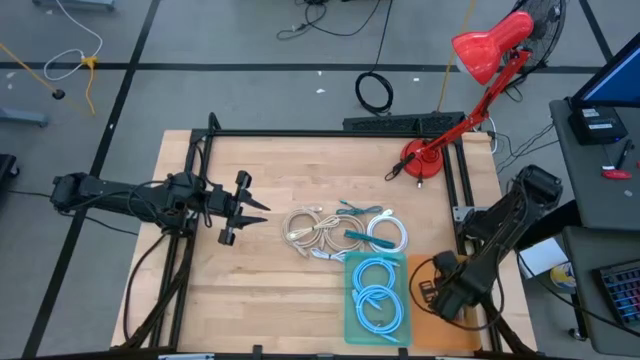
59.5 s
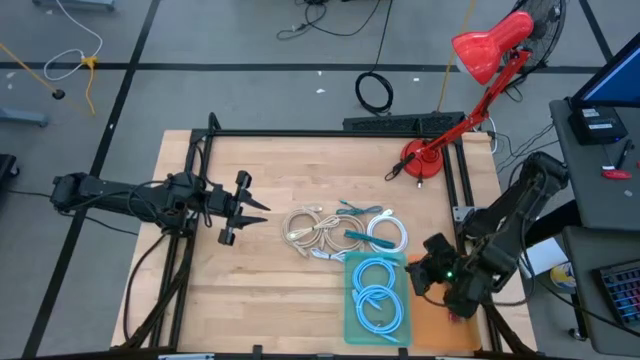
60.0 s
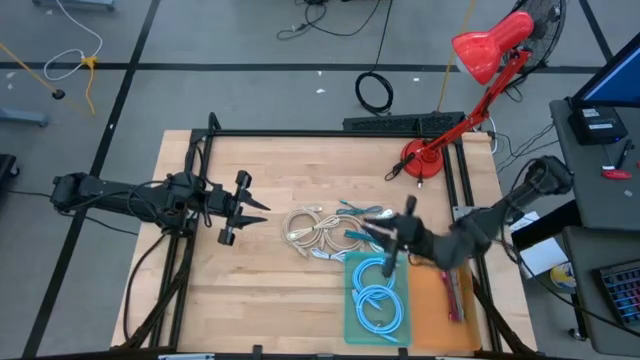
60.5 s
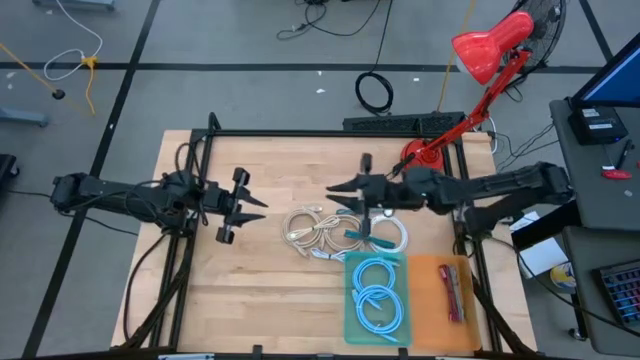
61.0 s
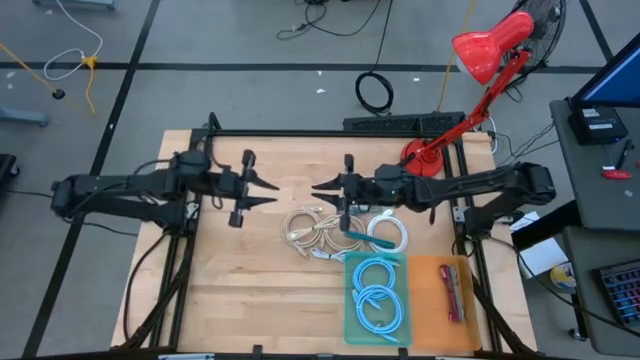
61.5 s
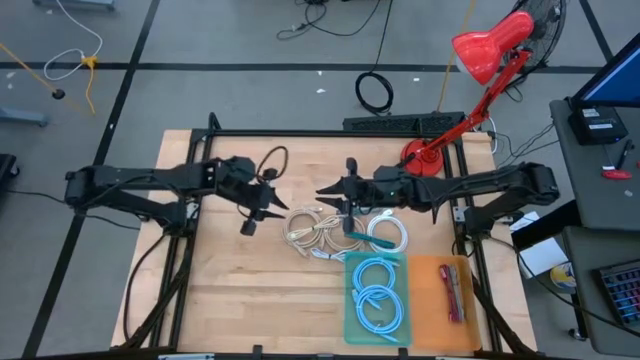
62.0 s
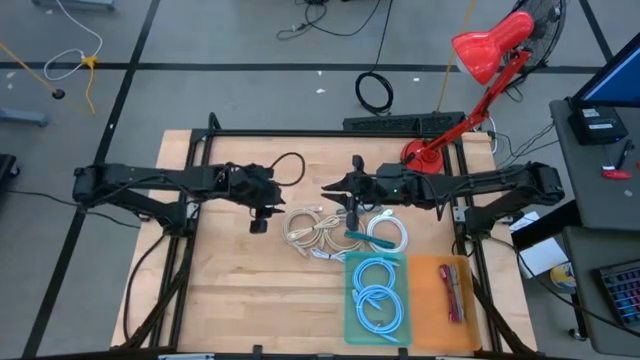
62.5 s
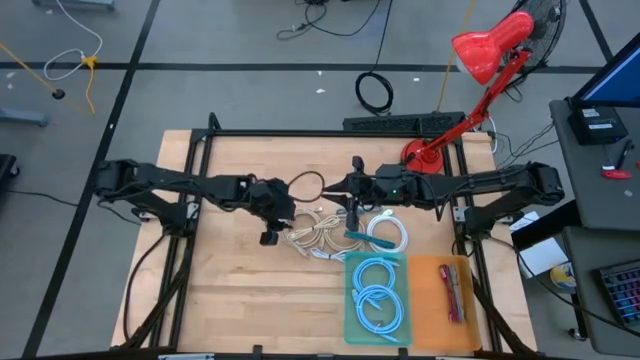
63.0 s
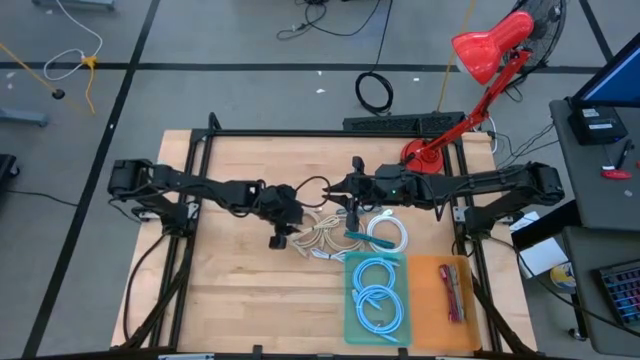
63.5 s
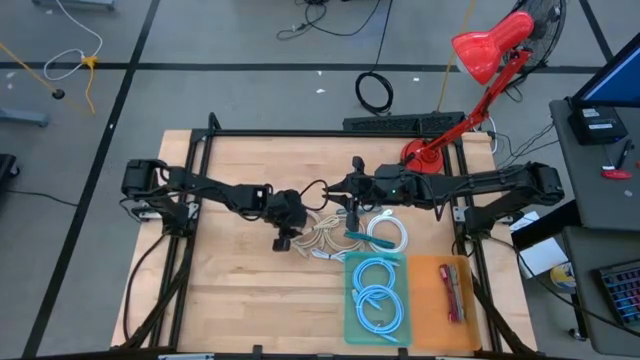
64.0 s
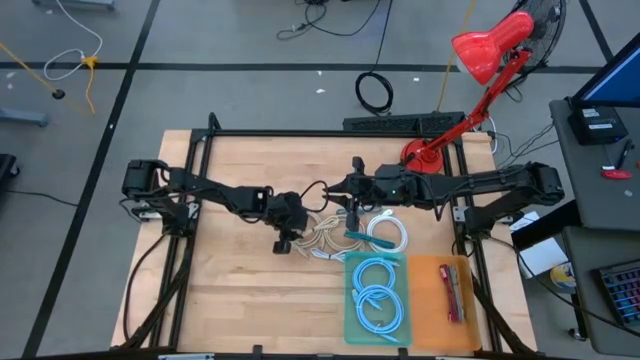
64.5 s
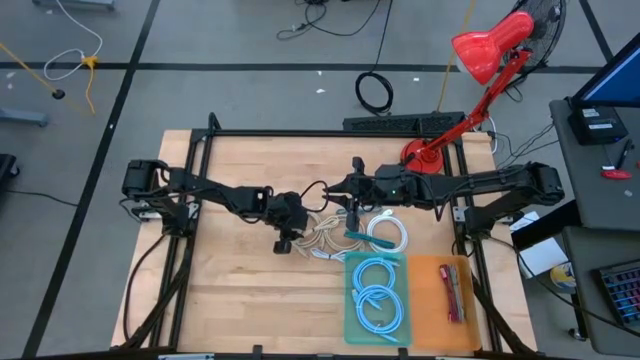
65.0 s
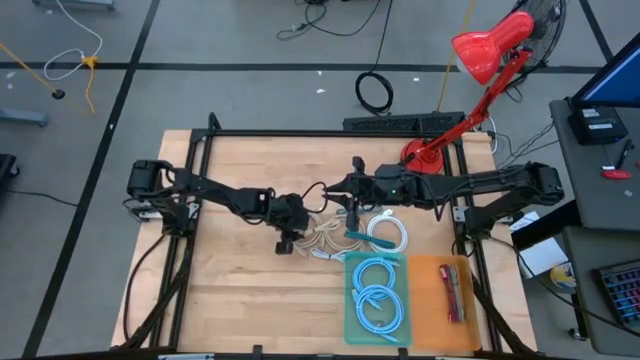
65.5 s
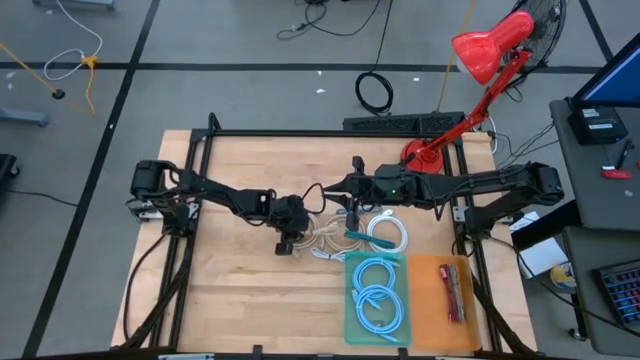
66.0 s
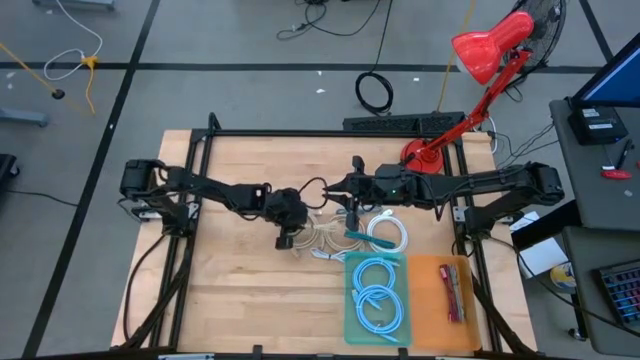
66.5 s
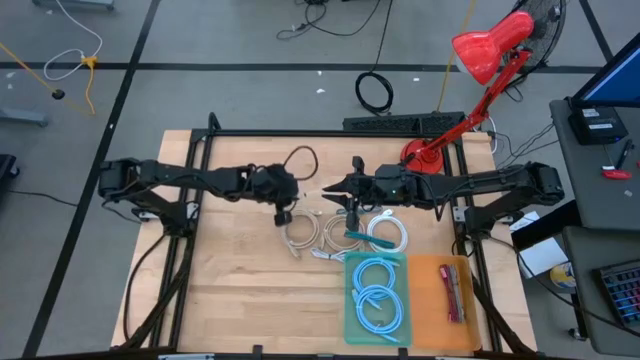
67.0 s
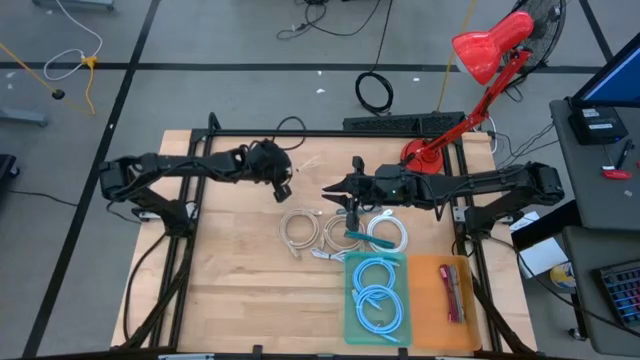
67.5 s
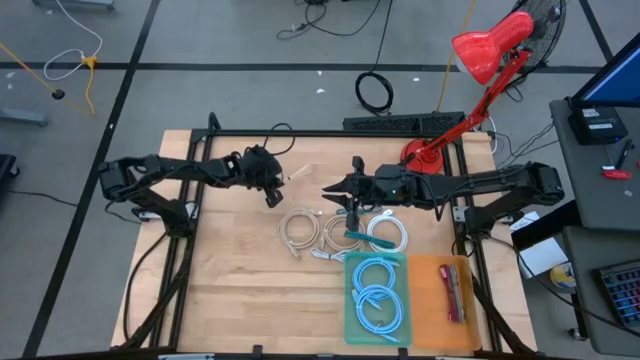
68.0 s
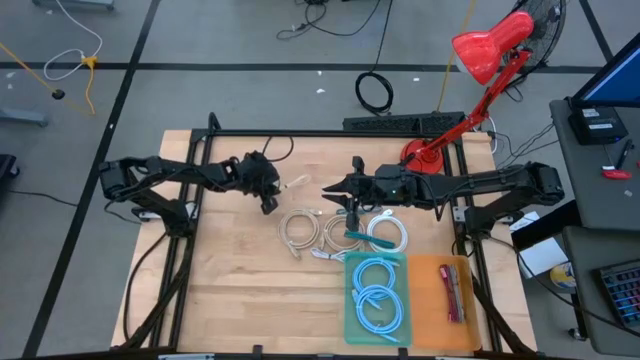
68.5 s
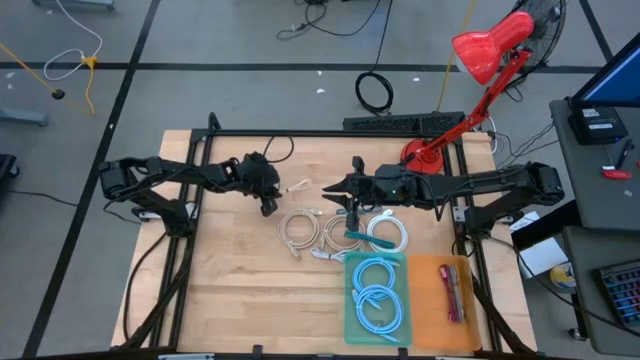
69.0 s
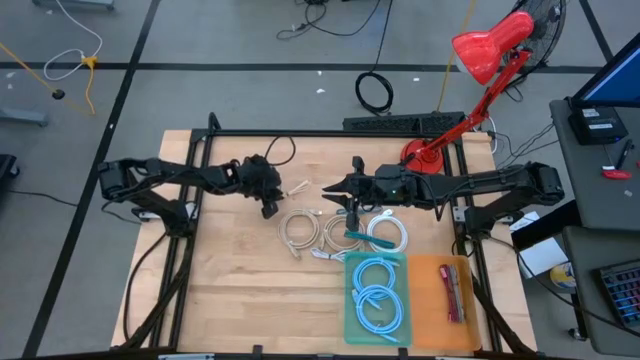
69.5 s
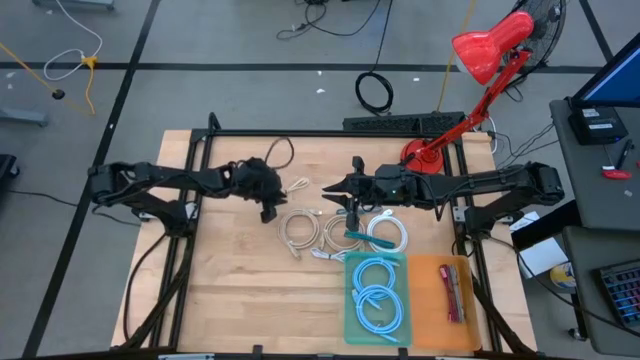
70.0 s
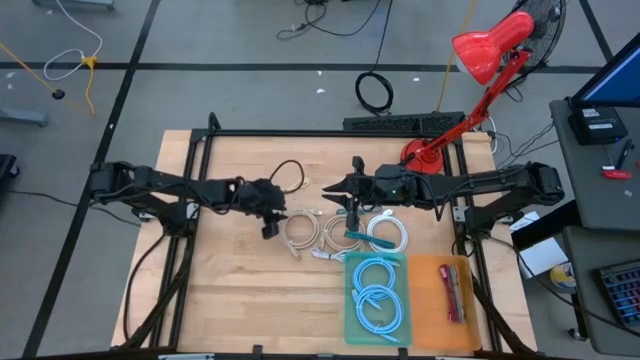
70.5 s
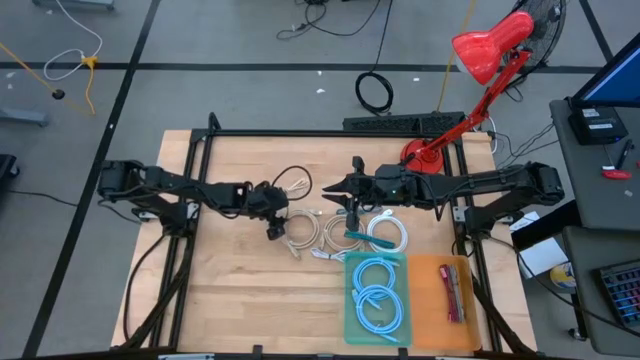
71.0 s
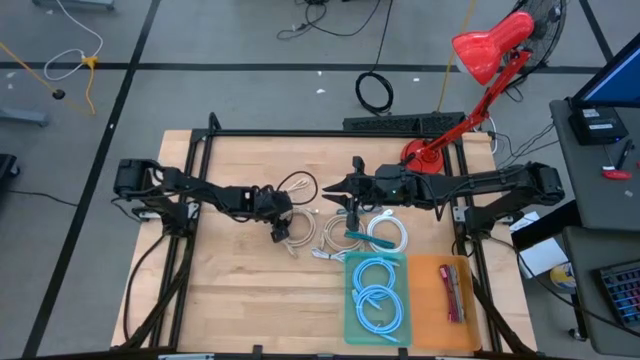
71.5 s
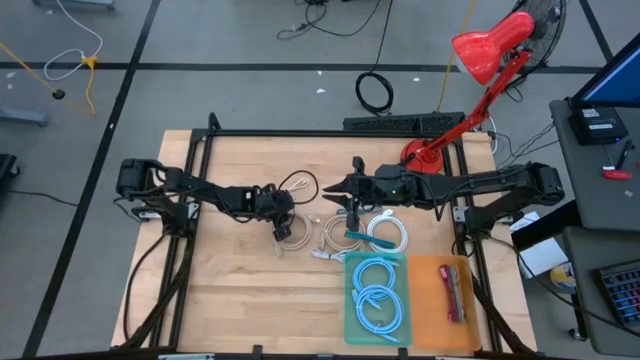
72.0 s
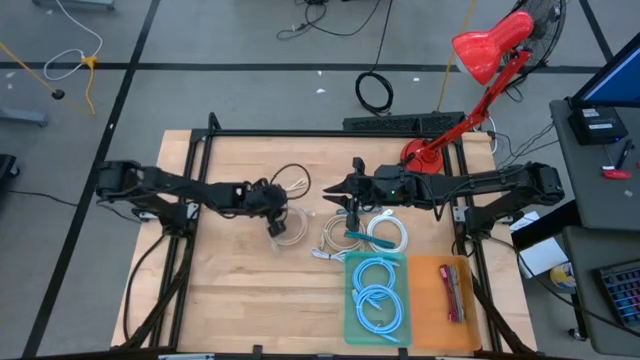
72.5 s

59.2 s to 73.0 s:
Task: Pick & Place USB Port
Put the brown charger cable into the blue bin

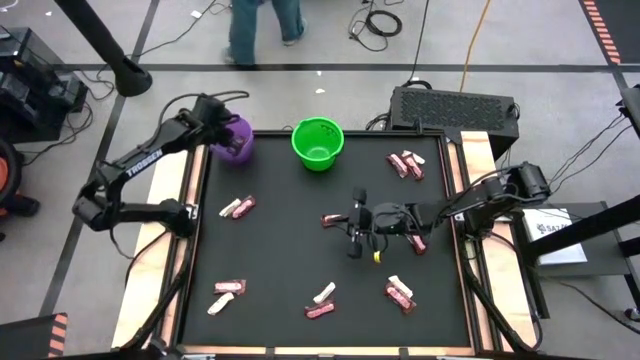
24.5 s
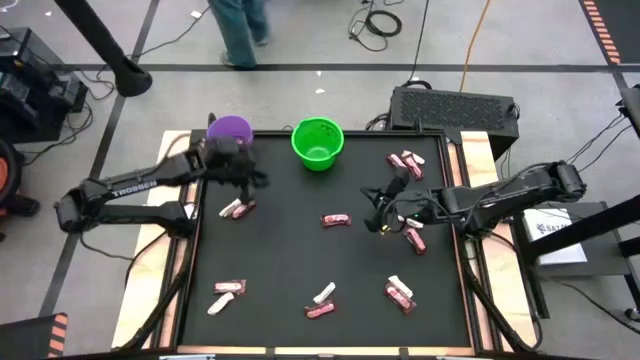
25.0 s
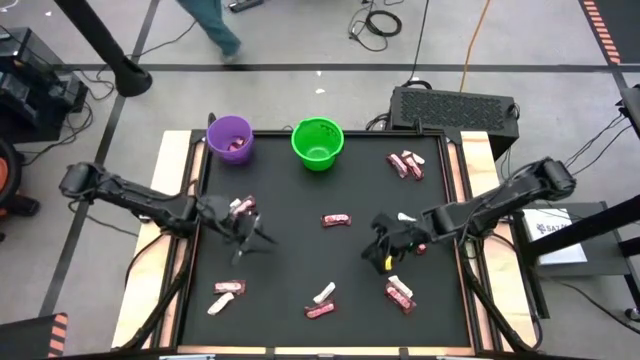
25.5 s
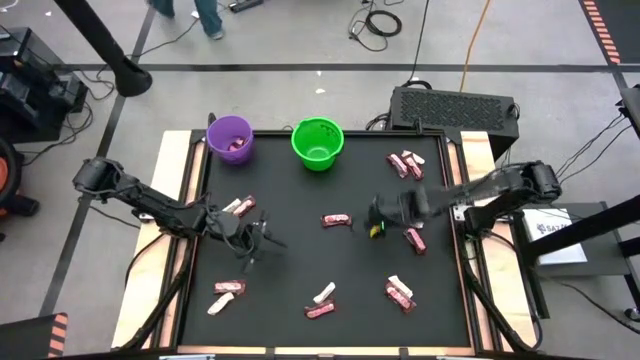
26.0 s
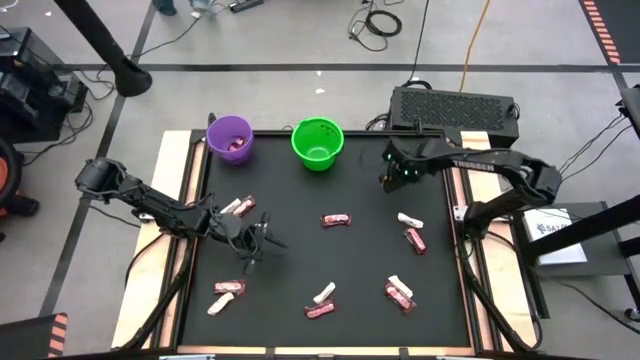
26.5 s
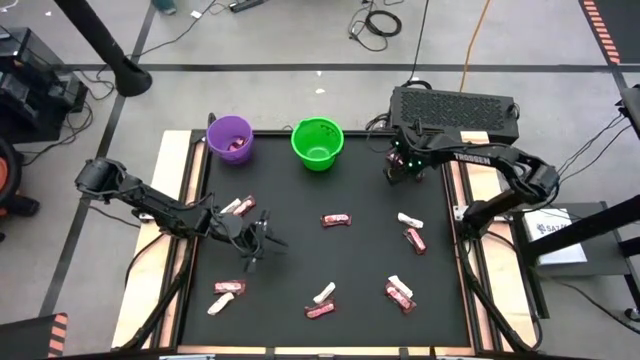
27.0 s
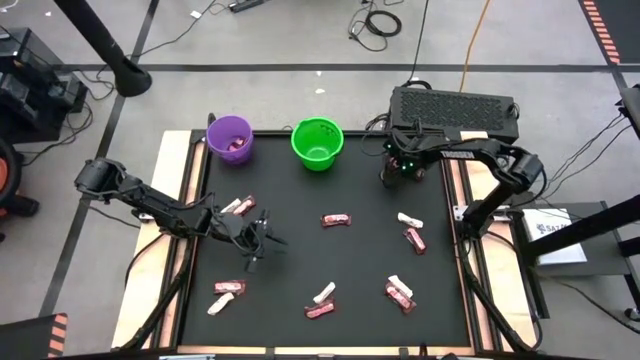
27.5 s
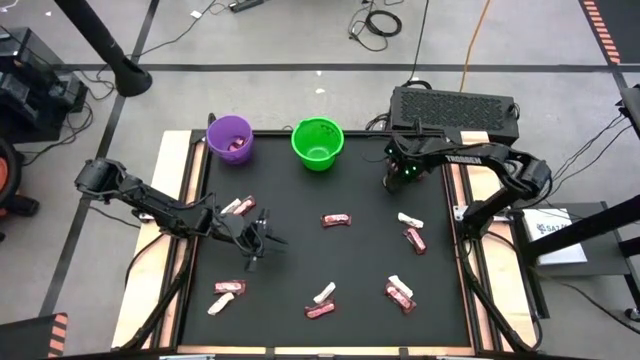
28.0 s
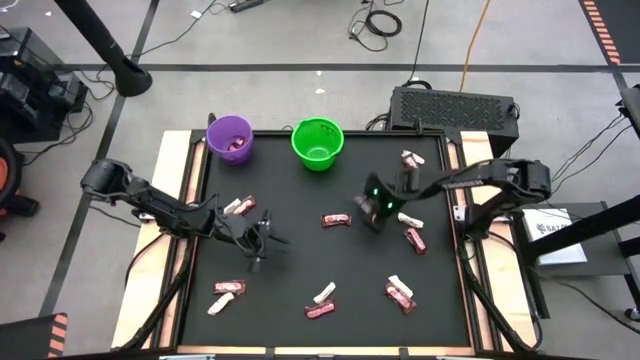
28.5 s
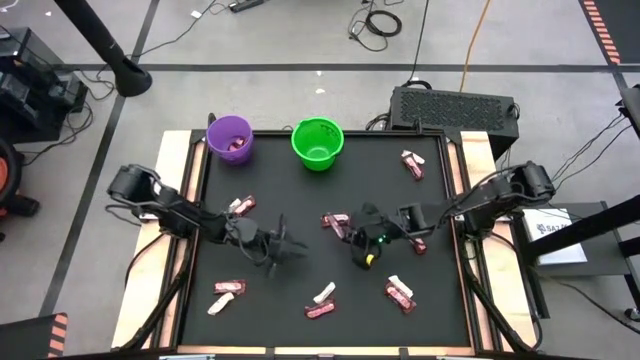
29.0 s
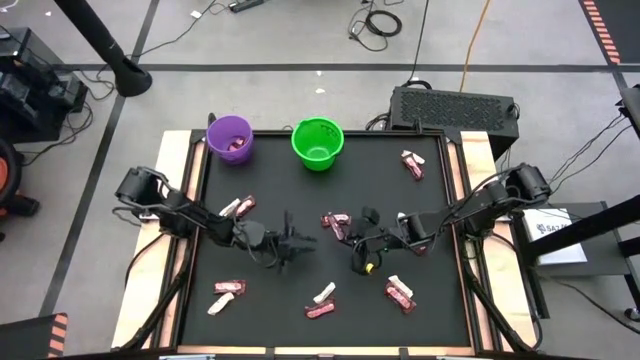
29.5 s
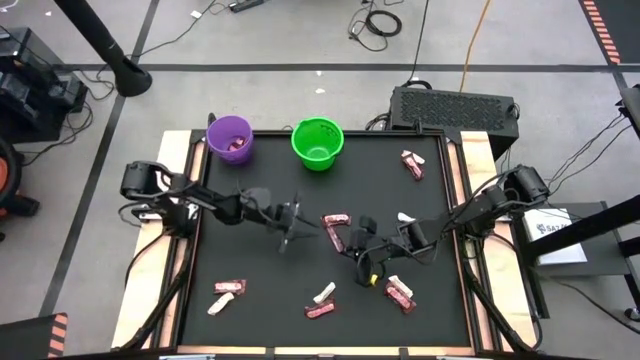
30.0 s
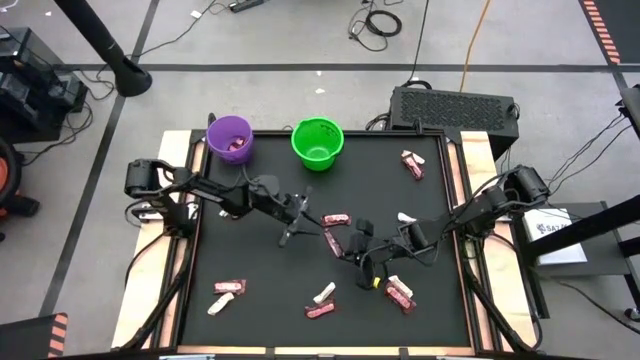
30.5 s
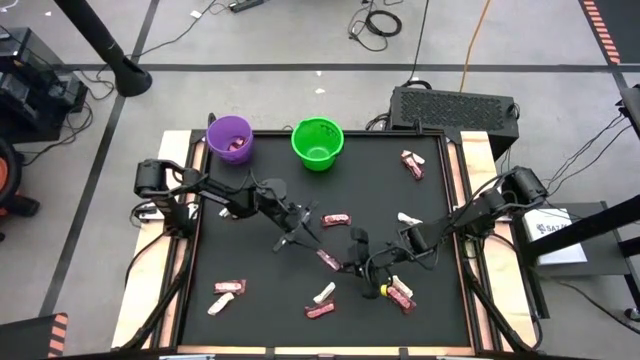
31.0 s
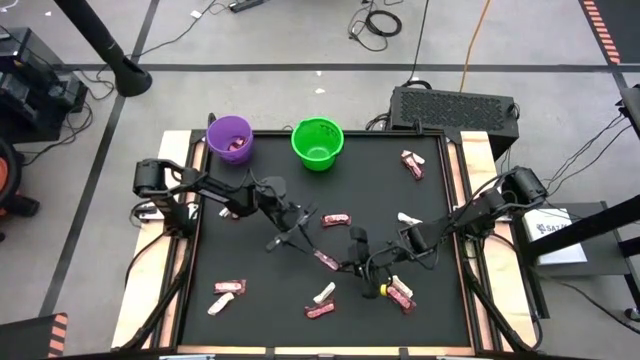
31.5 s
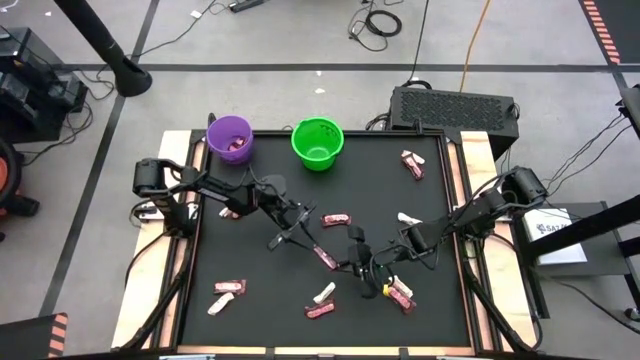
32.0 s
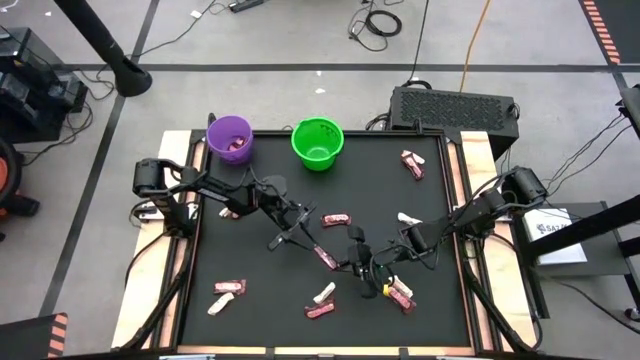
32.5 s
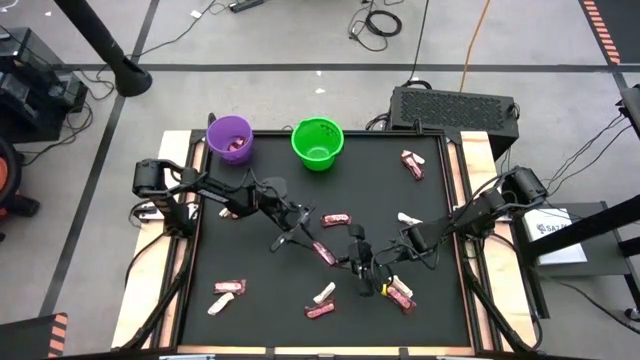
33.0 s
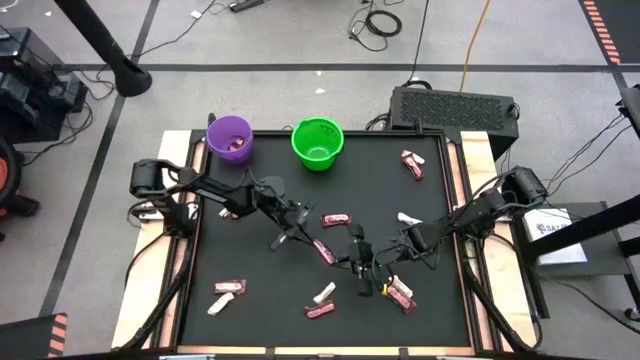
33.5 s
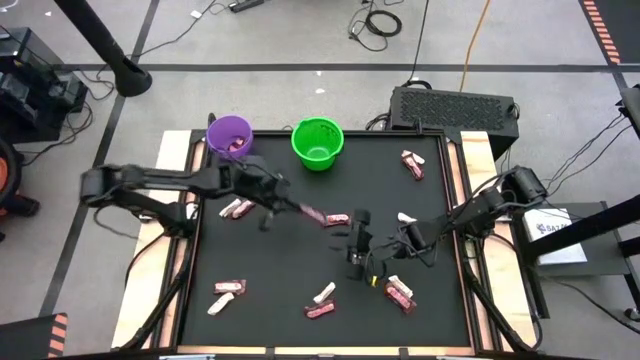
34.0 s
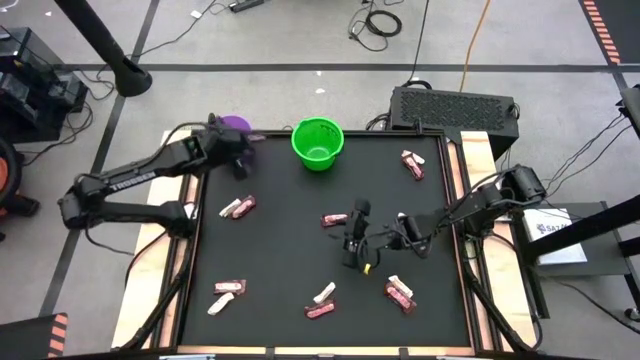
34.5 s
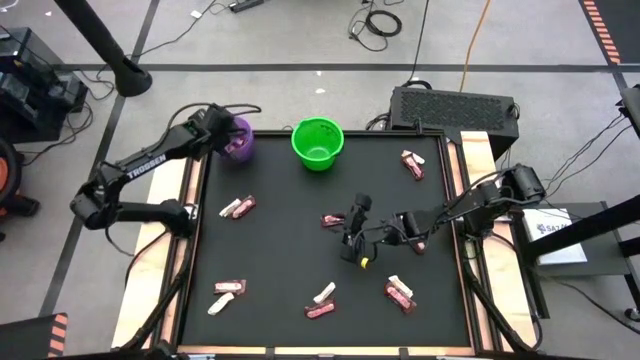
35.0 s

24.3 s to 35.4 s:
Task: Sort candy by brand, put in halloween buckets
Put the brown chocolate bar into the purple bucket
